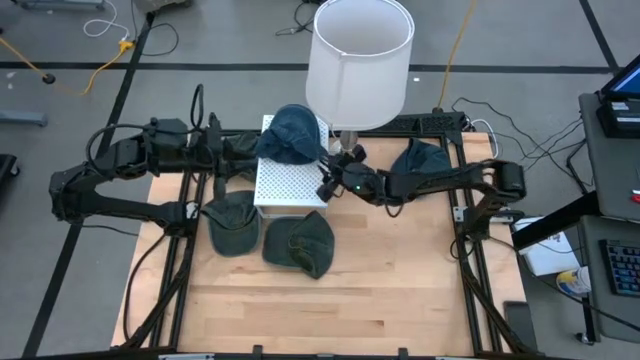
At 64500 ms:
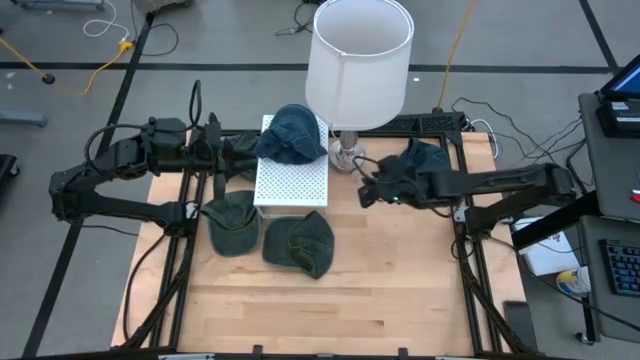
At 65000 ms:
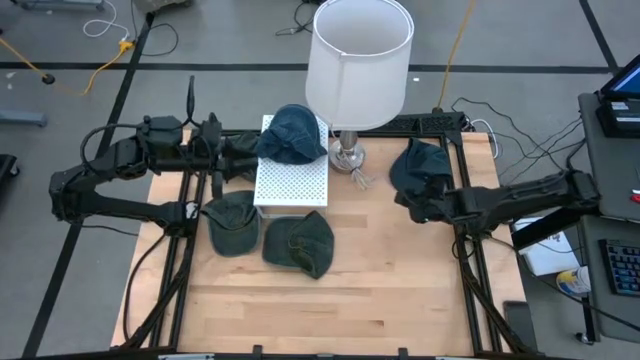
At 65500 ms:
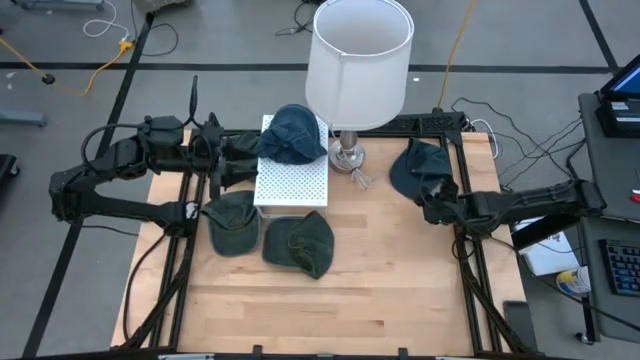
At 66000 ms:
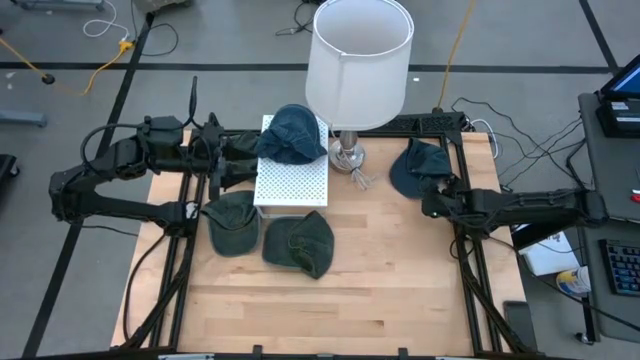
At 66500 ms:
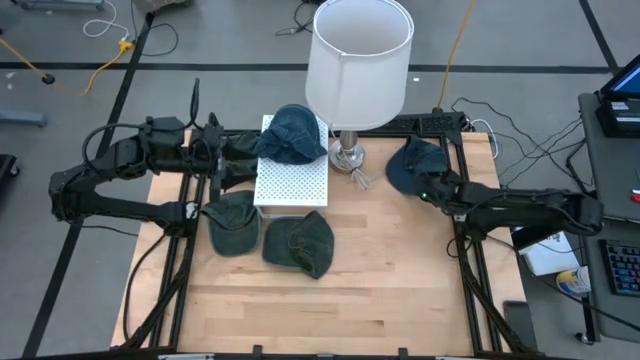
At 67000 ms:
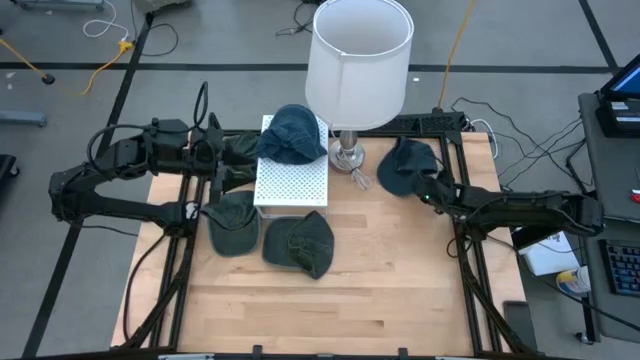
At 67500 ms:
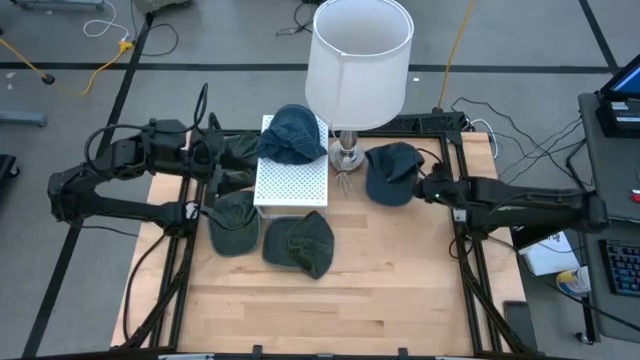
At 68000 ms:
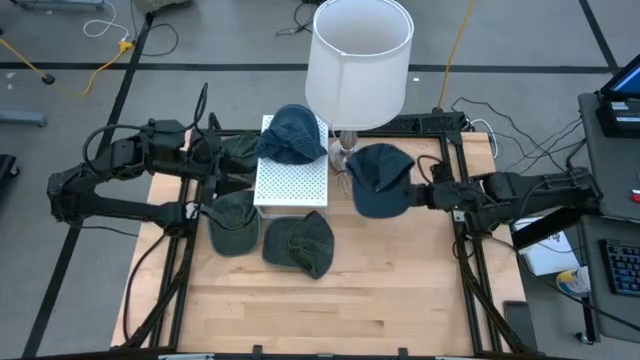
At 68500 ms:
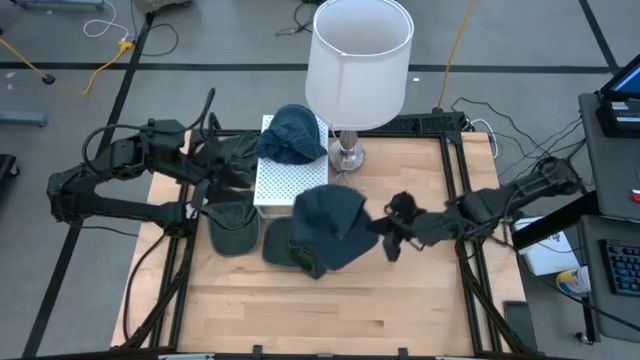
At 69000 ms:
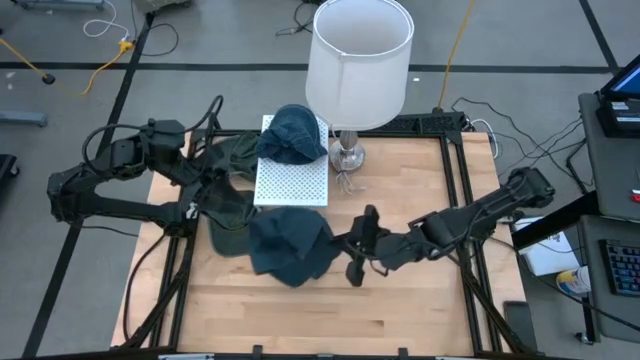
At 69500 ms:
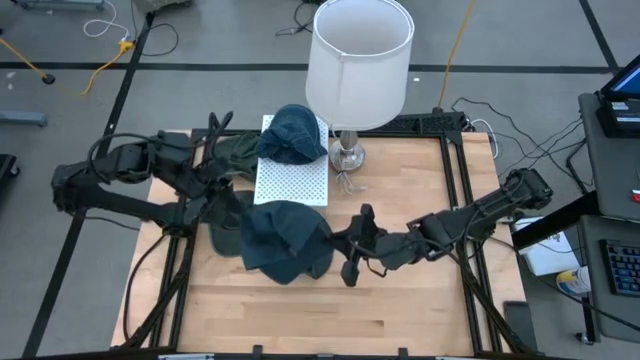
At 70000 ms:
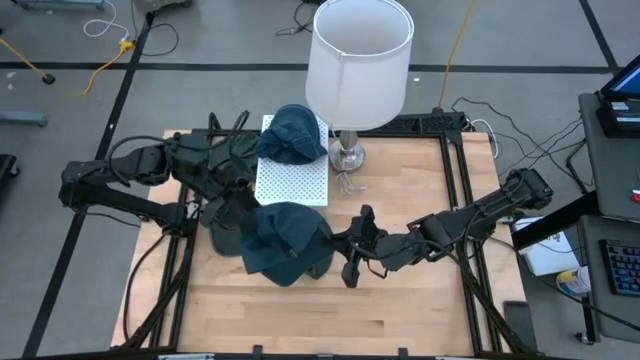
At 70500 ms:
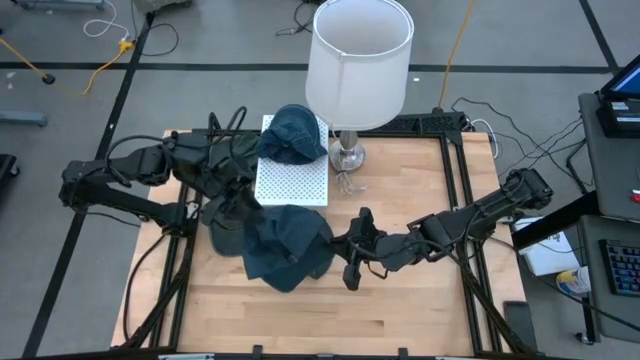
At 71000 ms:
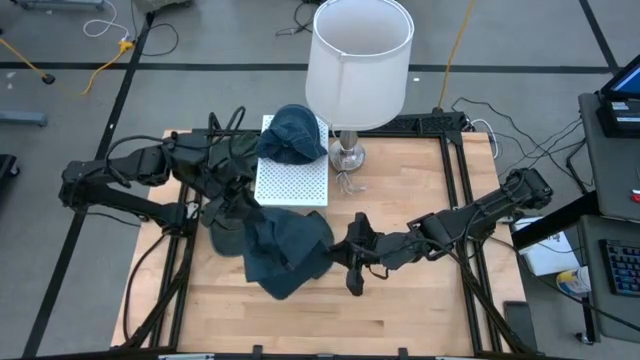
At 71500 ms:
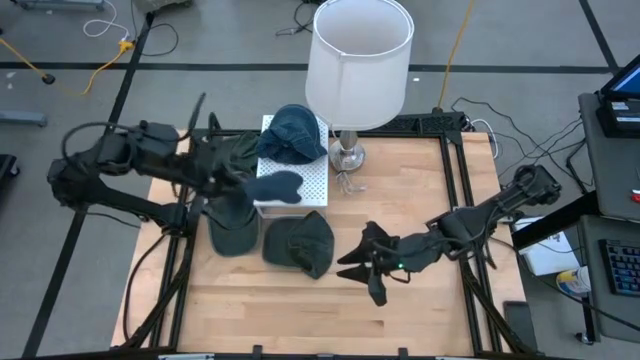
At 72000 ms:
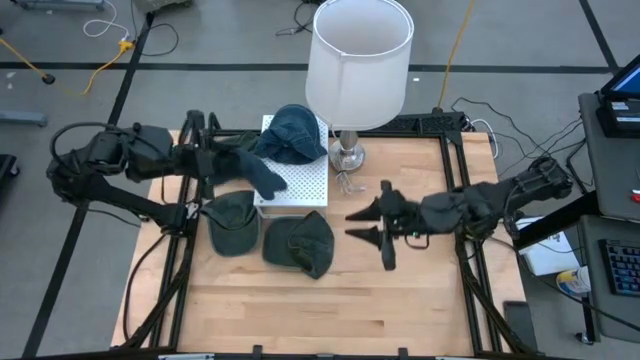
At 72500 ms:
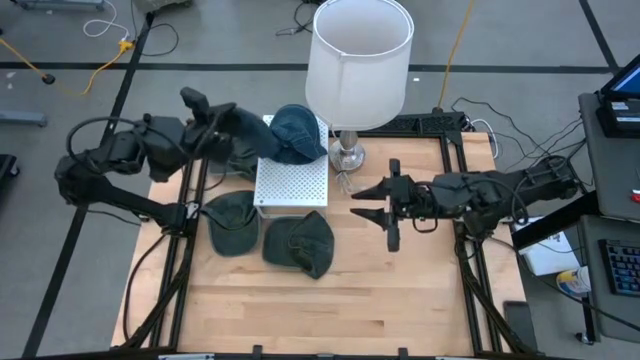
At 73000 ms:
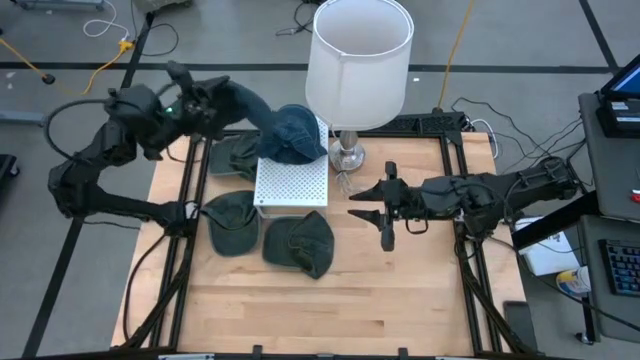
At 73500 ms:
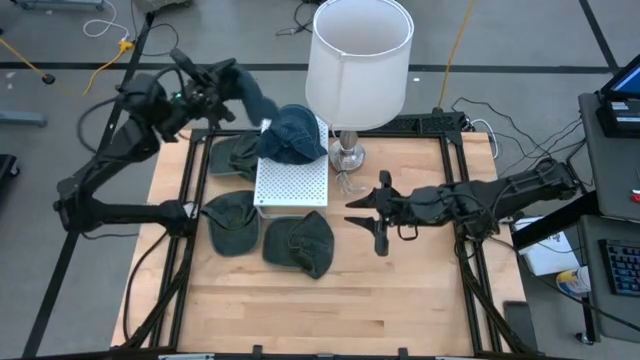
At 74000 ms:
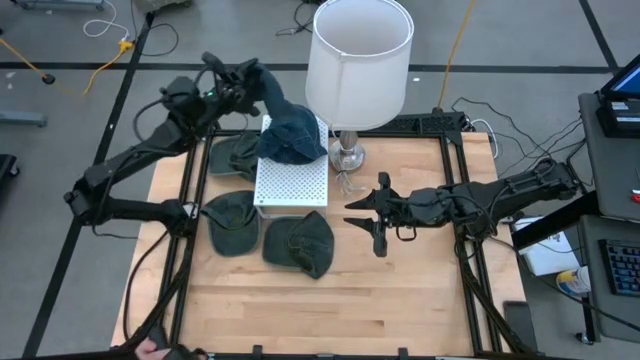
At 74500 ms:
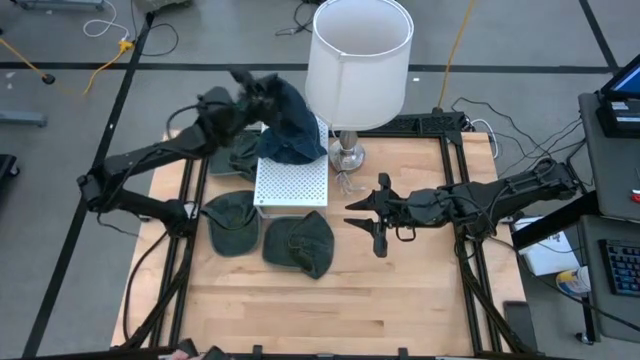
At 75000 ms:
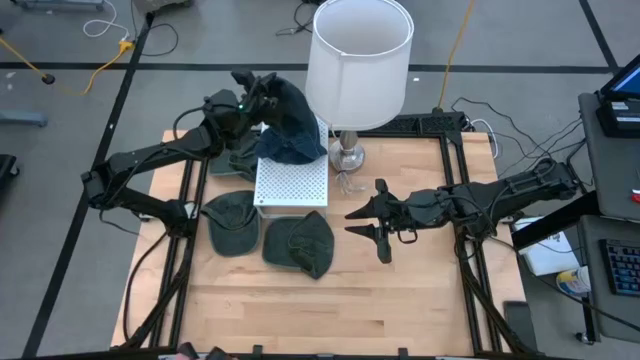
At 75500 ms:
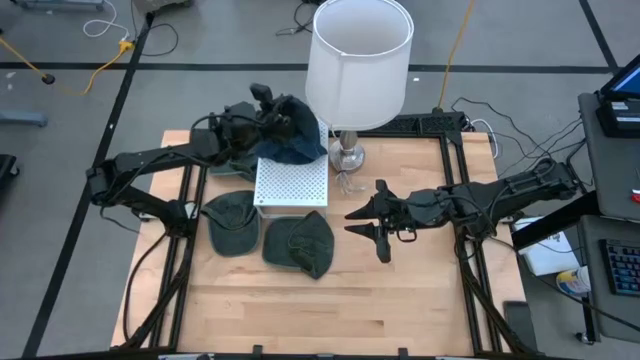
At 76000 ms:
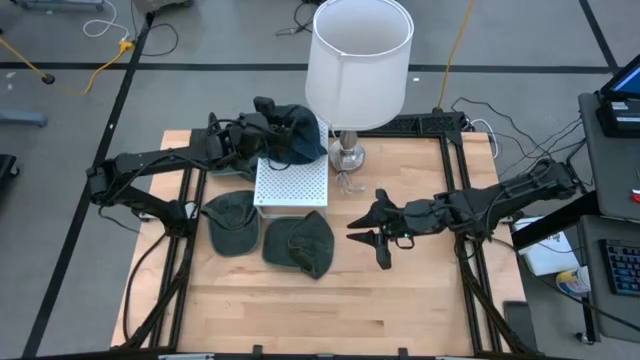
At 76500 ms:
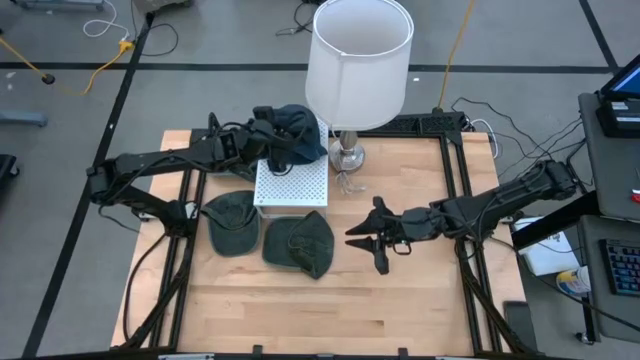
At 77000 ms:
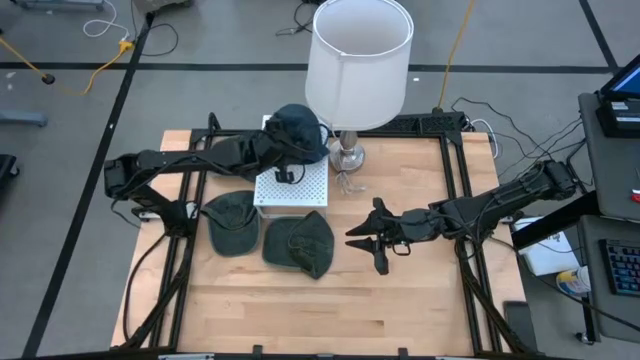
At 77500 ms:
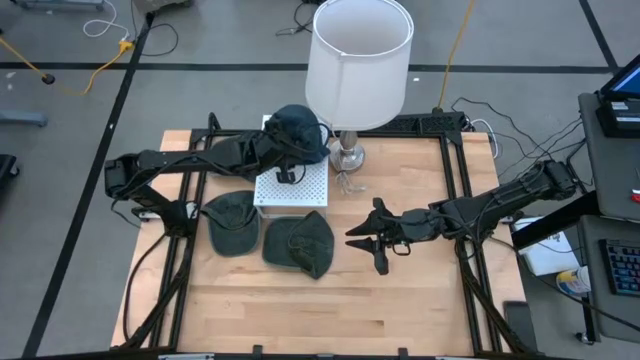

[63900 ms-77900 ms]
Task: Pick & Place hat
Stack the blue cap on the blue caps on the shelf

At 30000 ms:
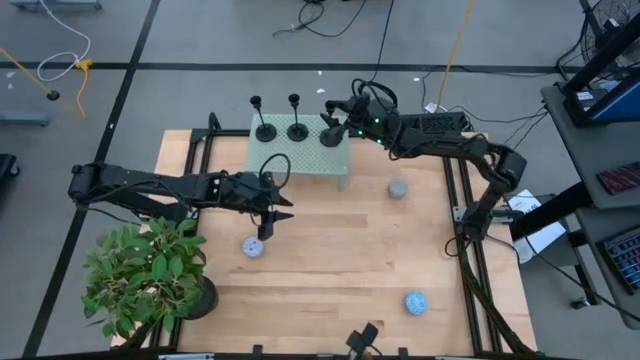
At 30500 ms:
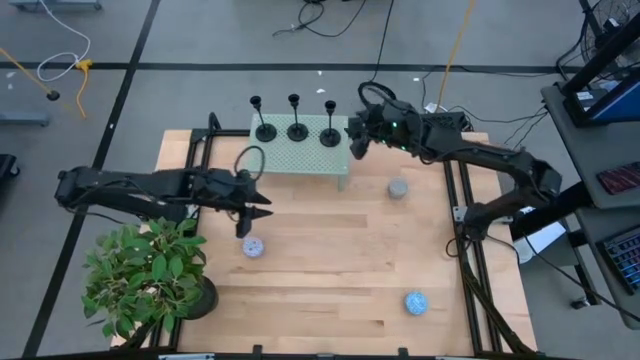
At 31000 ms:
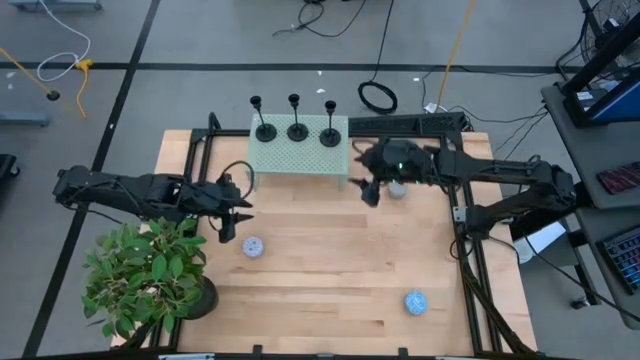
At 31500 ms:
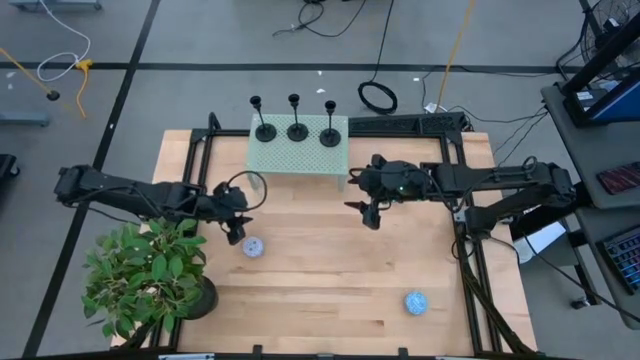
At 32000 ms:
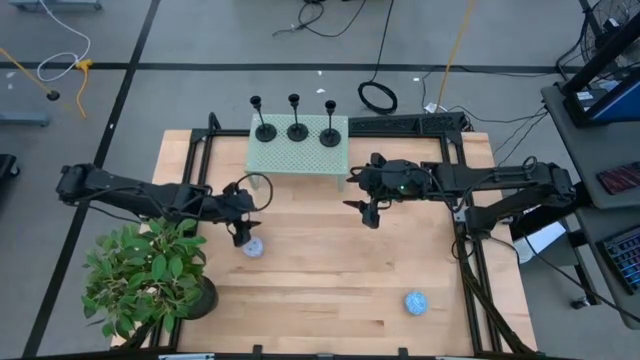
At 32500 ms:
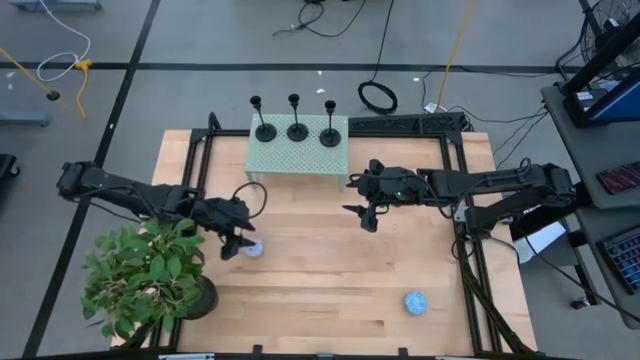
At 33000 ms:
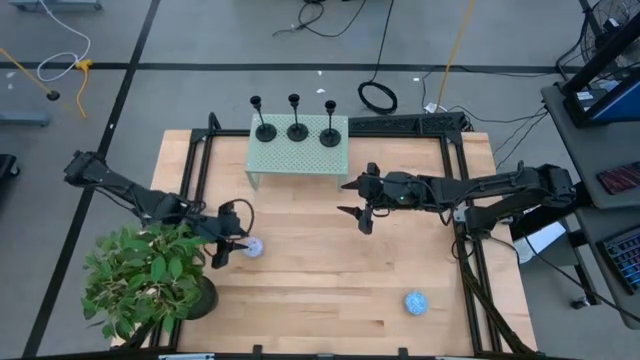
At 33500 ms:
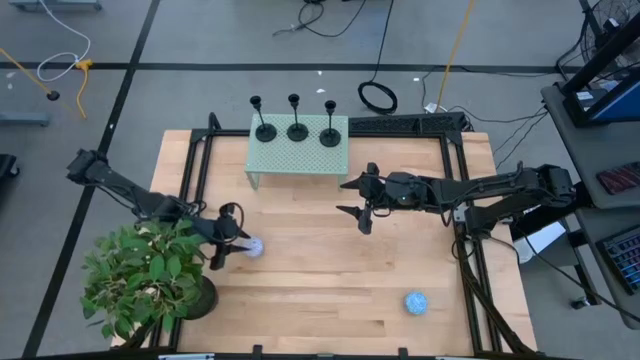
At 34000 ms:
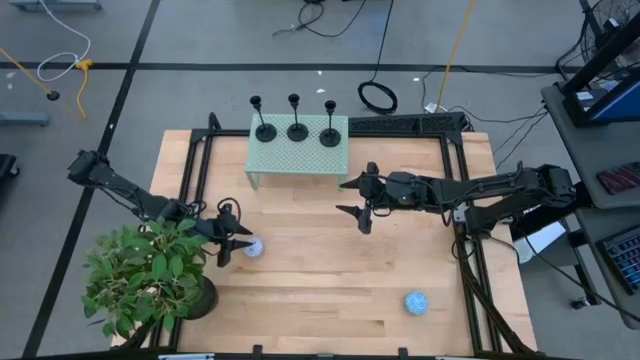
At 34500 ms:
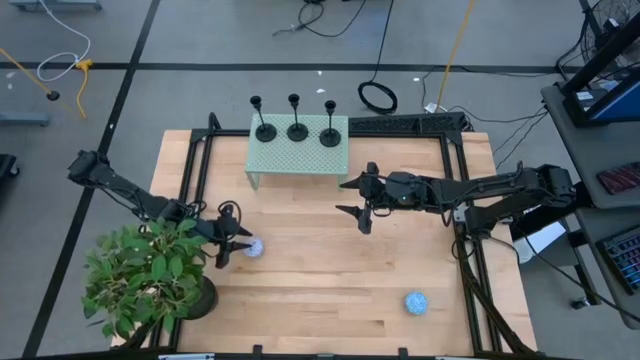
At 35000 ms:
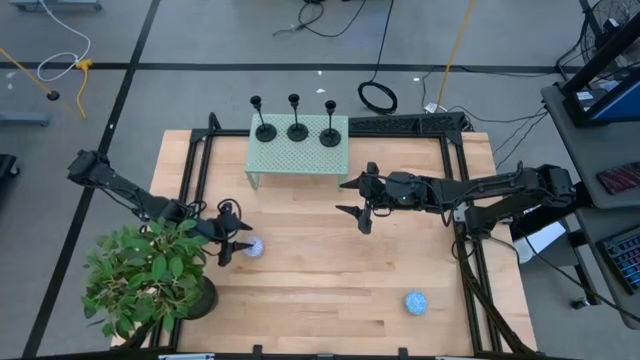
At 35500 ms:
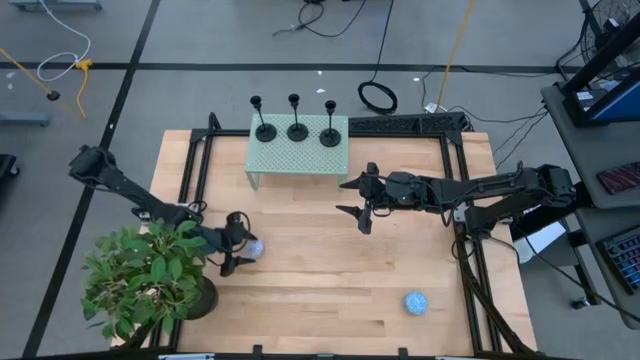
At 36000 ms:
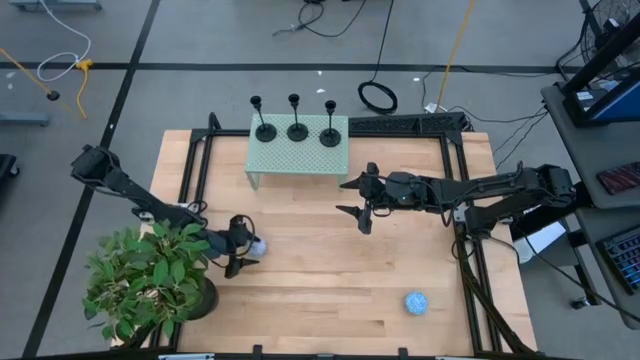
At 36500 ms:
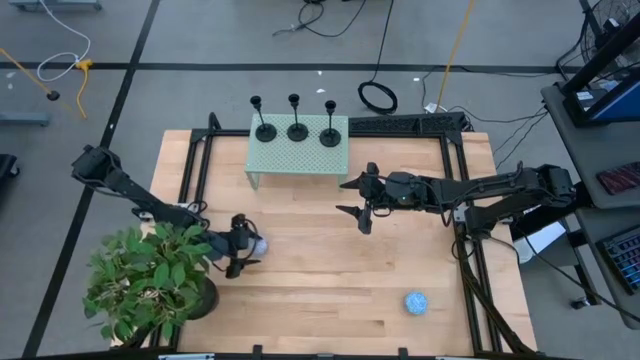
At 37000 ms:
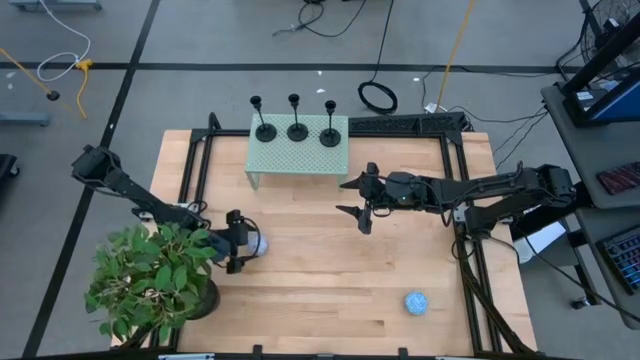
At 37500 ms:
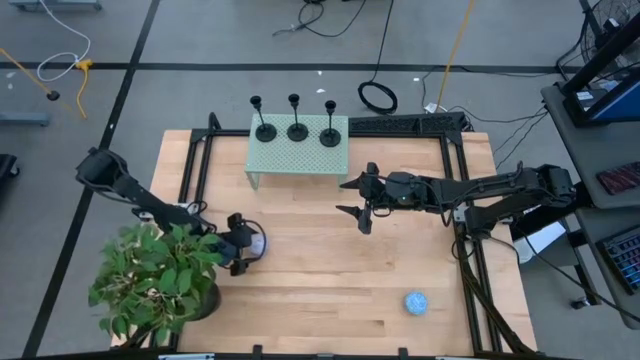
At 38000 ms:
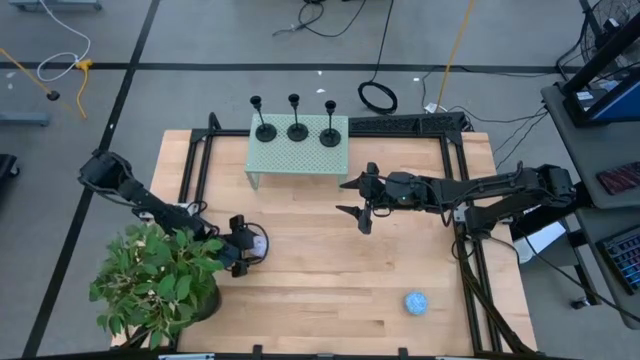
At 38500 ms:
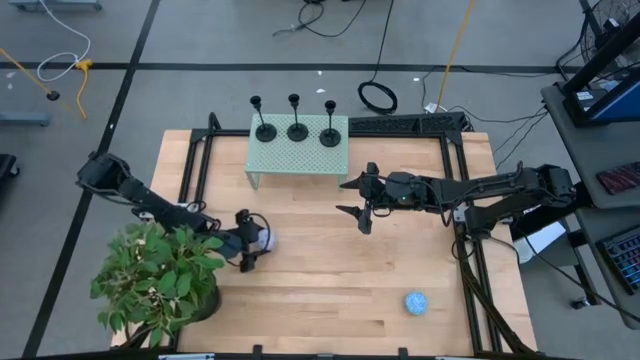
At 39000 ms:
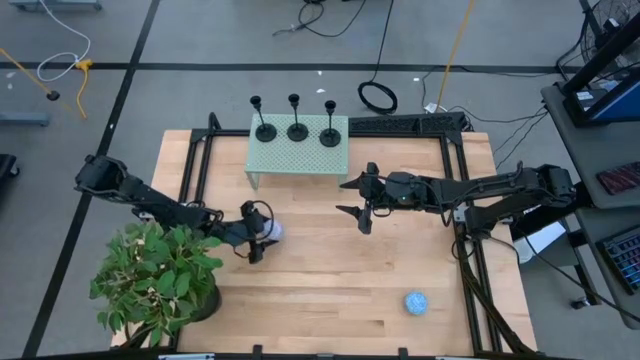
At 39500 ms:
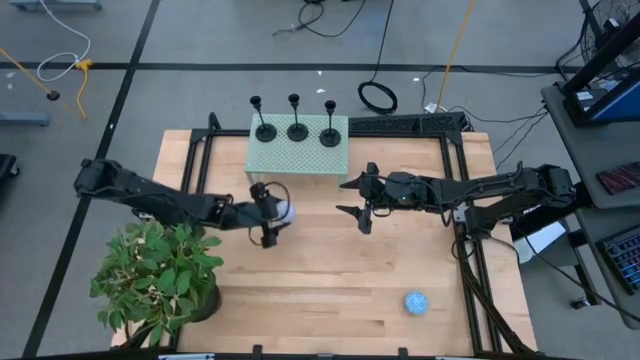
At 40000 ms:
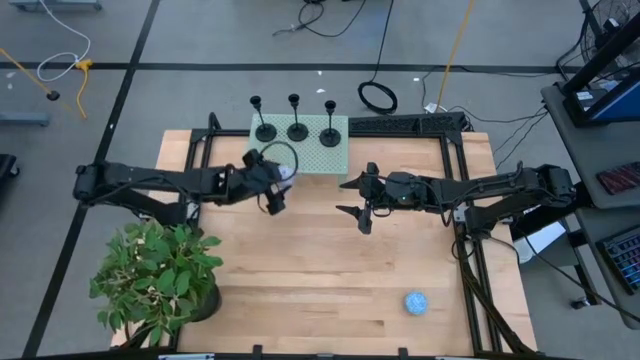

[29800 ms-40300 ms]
Task: Pick & Place candle stick holders
Put the red patterned scented candle on the shelf
